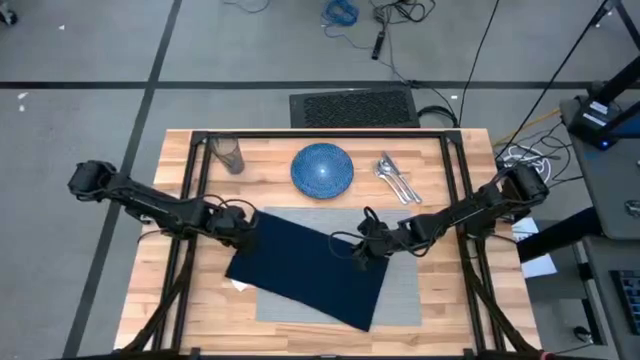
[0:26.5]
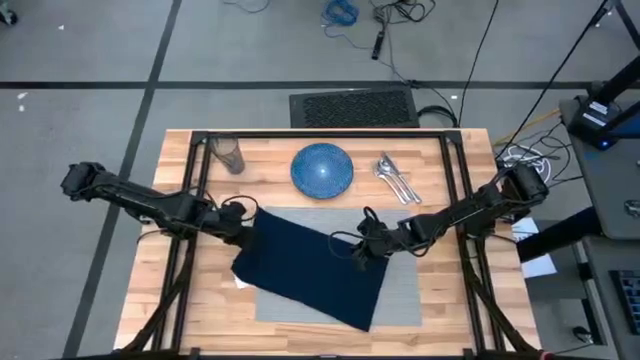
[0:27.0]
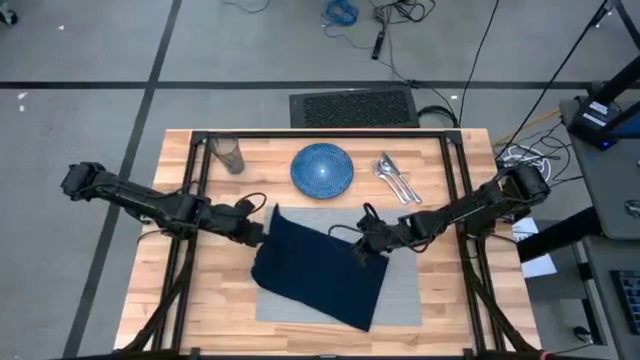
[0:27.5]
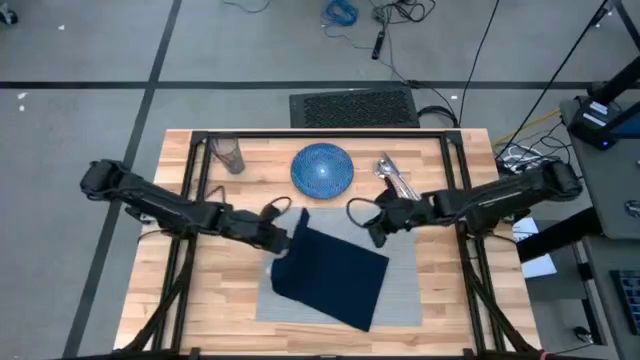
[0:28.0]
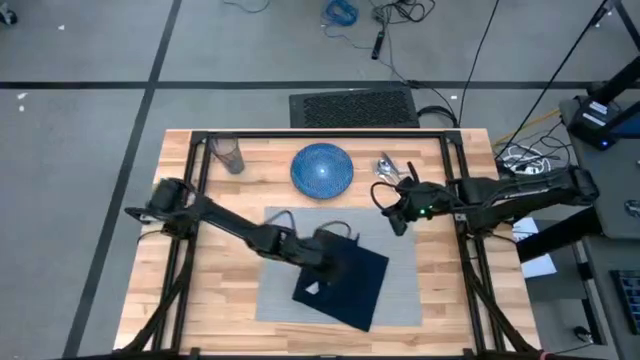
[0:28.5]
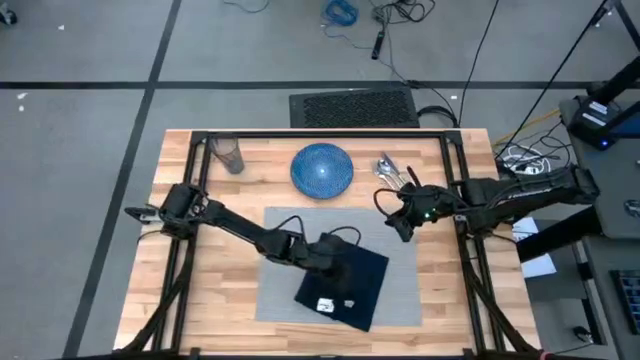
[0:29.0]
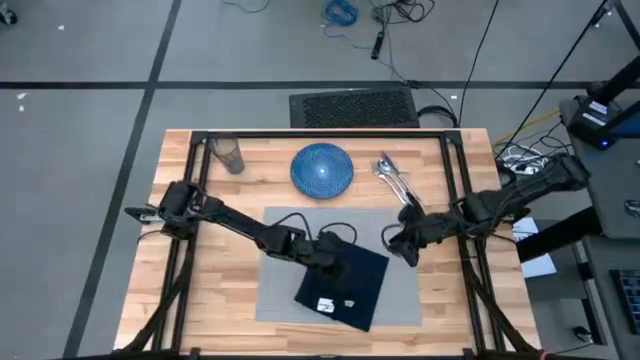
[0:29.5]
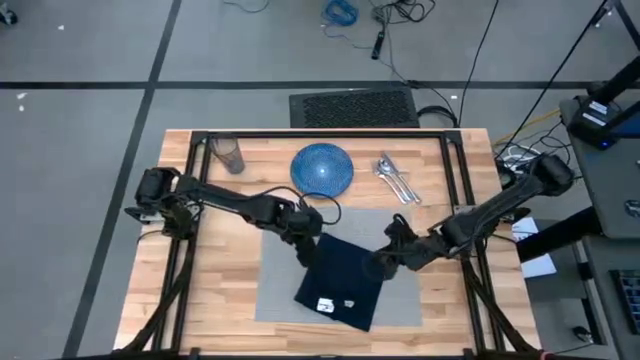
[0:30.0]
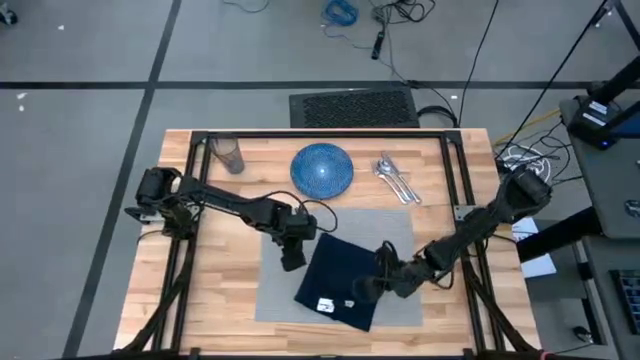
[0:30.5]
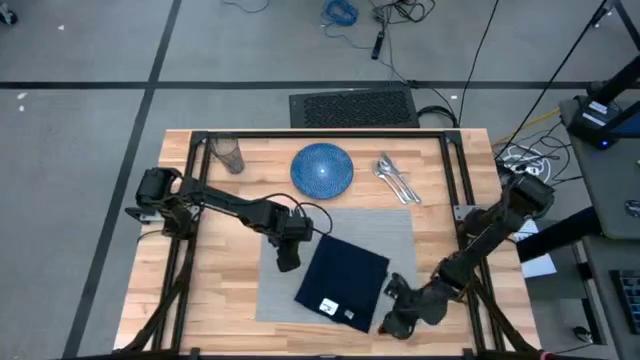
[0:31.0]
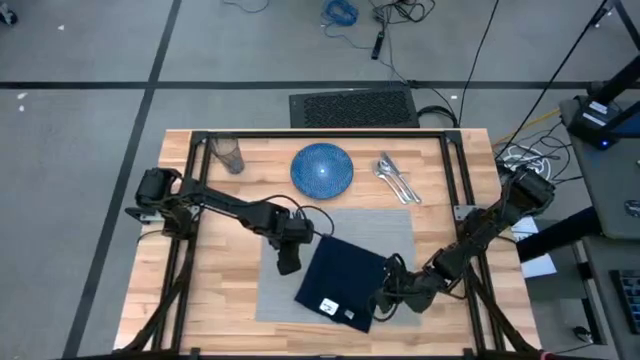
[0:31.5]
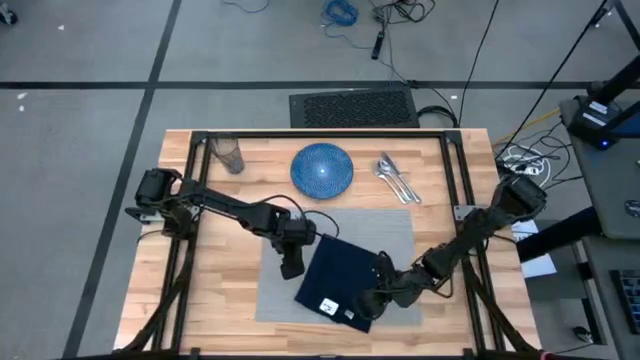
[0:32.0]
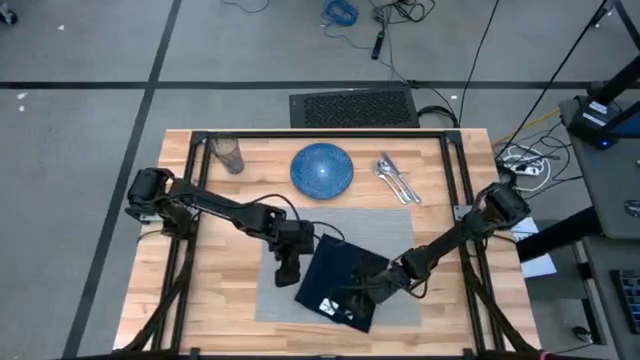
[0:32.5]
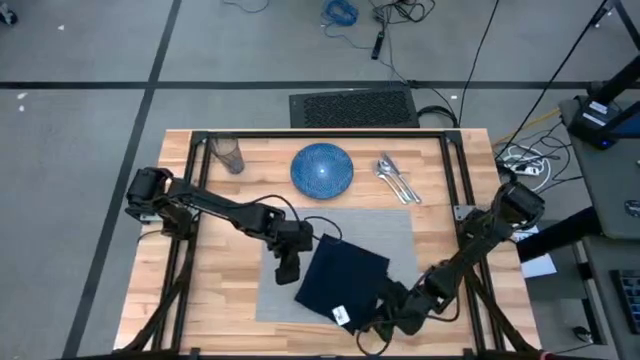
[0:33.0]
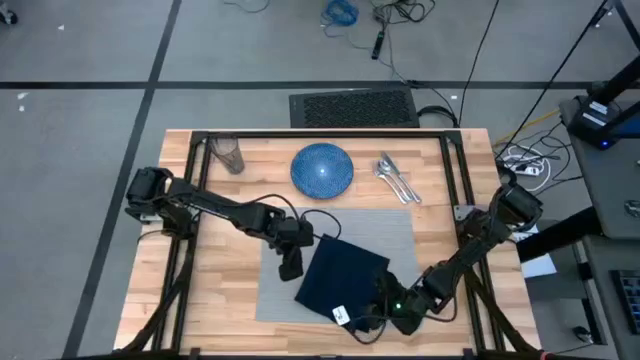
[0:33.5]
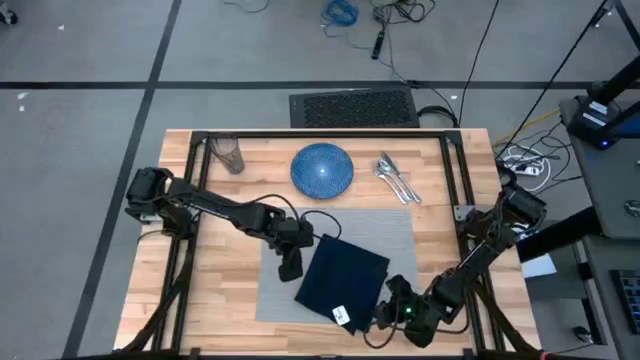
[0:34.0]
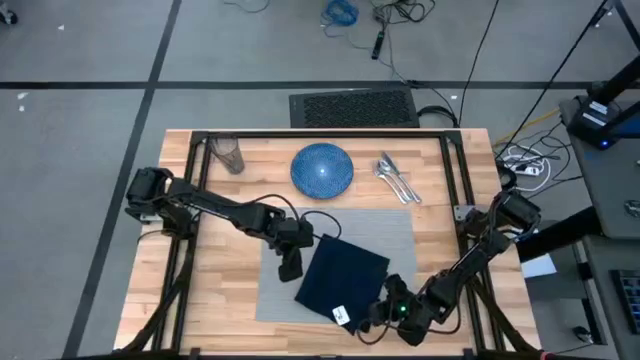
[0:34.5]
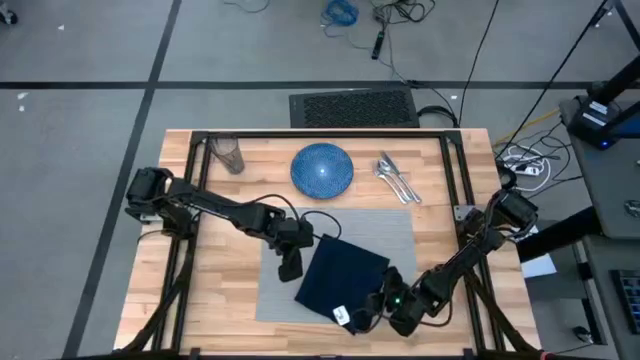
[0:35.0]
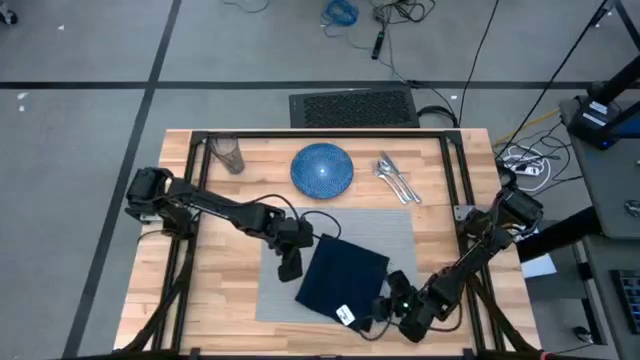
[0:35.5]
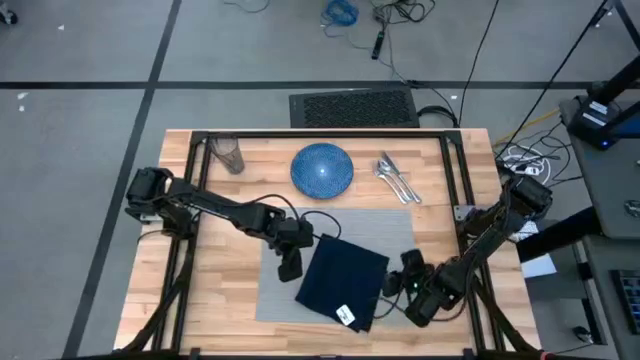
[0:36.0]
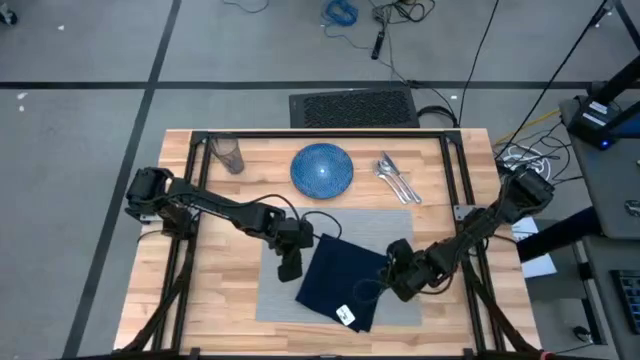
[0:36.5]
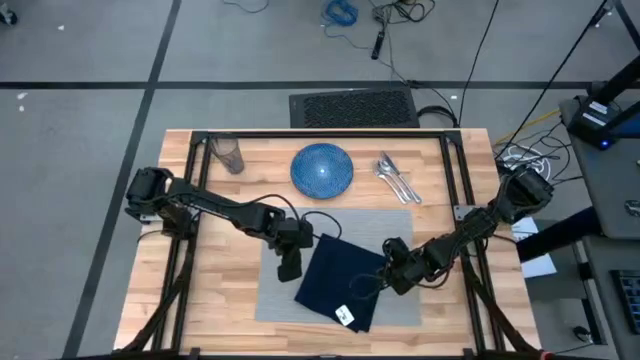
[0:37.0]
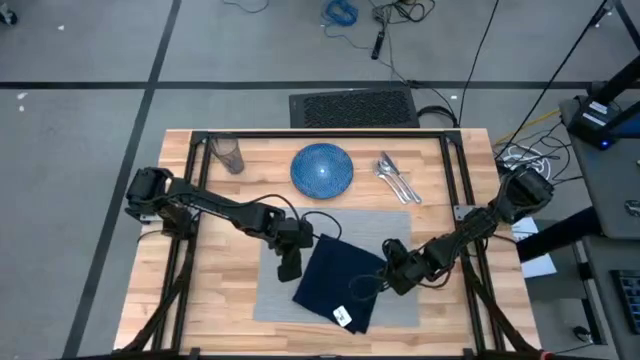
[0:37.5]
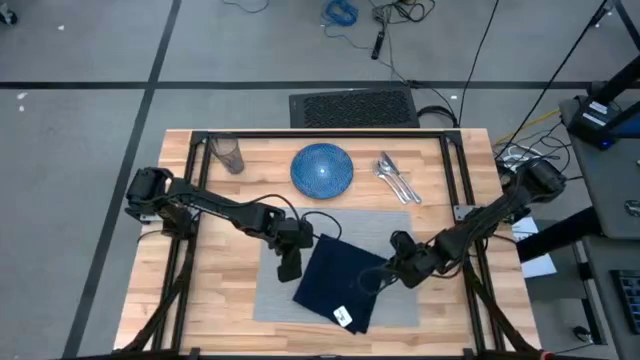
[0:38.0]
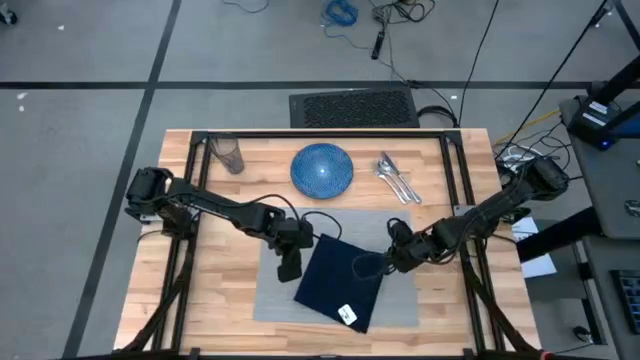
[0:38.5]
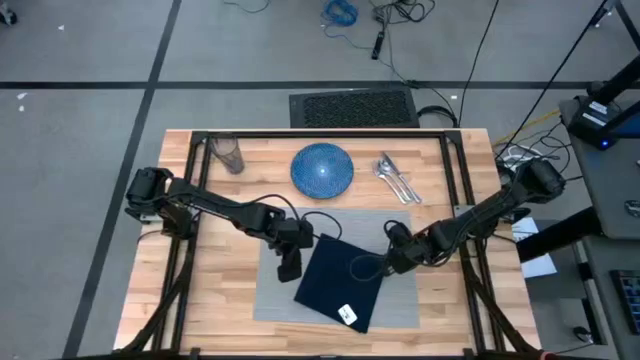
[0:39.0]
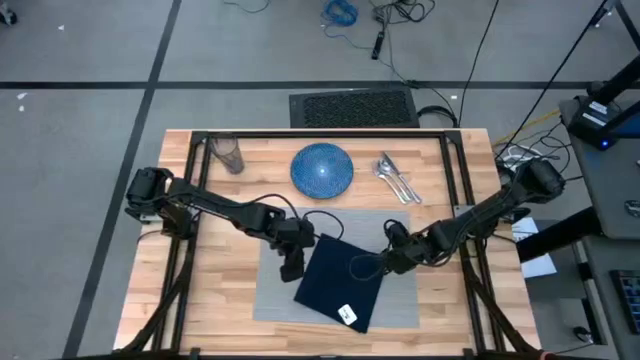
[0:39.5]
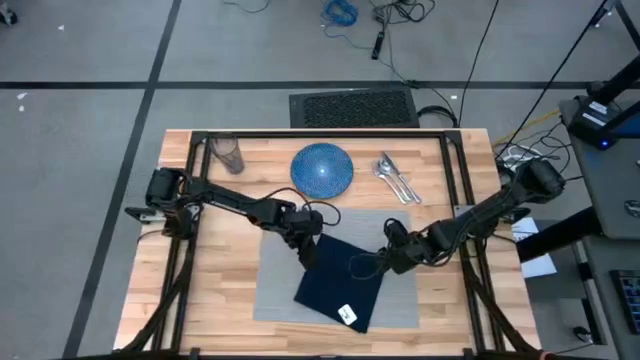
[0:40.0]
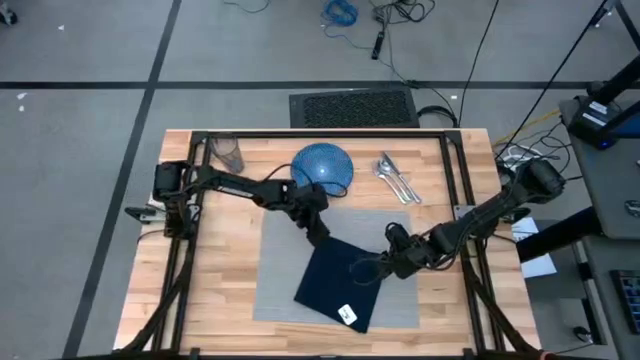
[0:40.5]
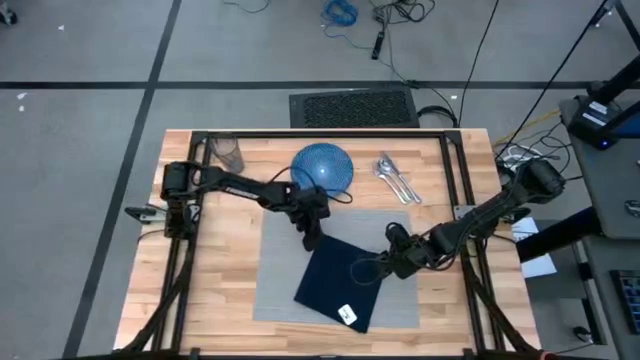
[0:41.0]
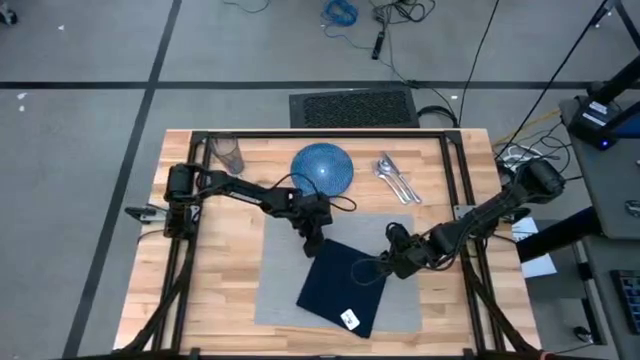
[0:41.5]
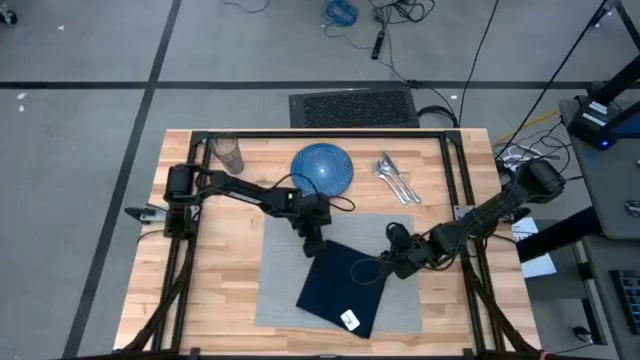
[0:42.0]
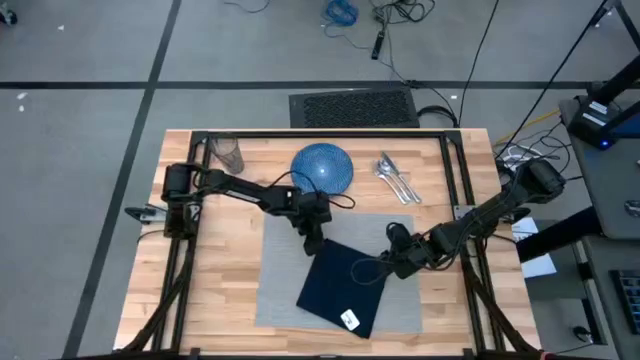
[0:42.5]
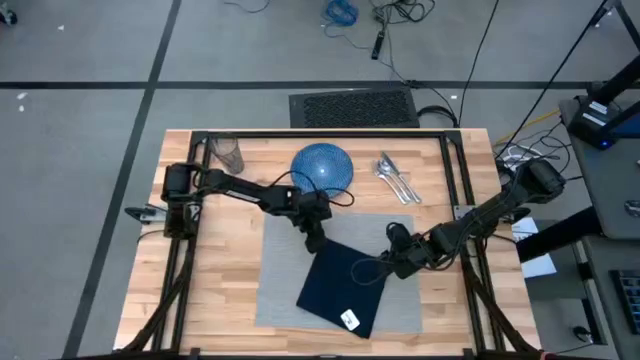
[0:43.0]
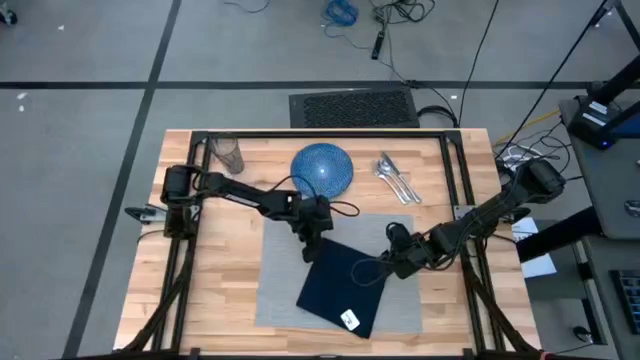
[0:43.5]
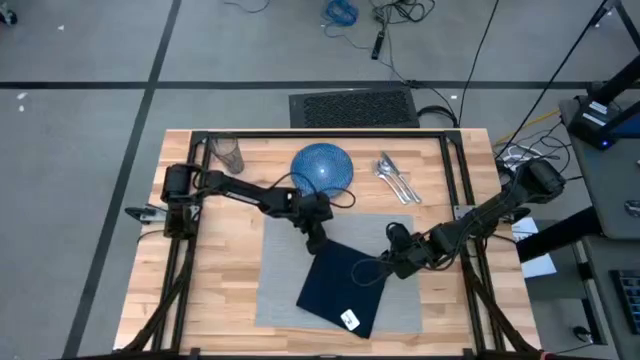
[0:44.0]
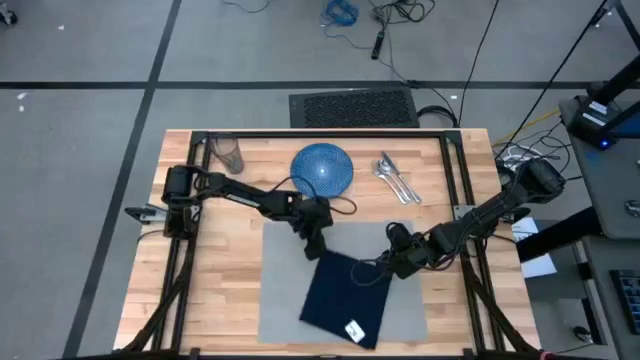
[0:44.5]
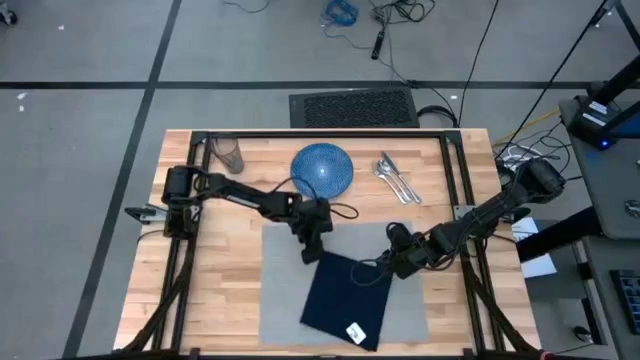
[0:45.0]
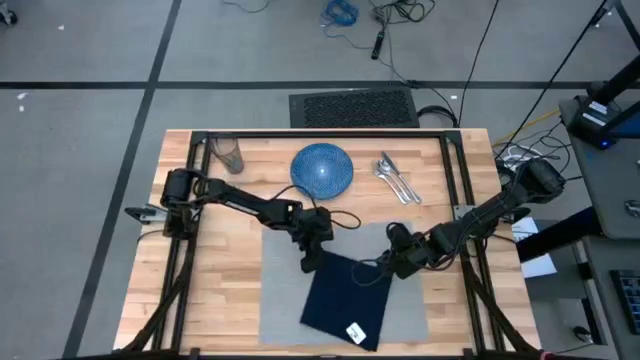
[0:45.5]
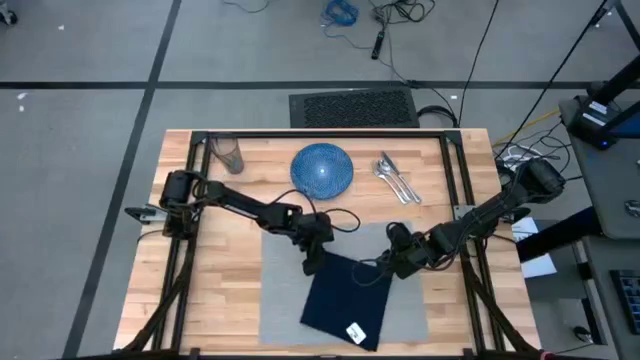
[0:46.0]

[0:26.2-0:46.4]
Task: Set table place
Fold the blue table napkin
